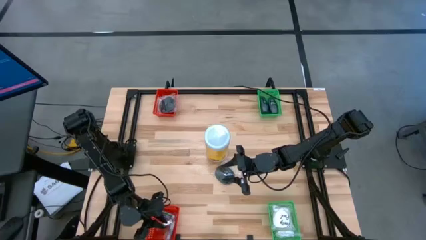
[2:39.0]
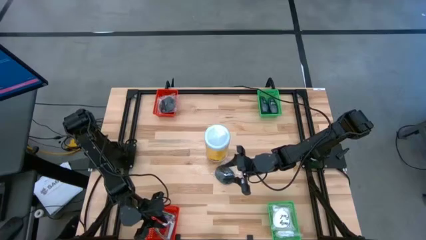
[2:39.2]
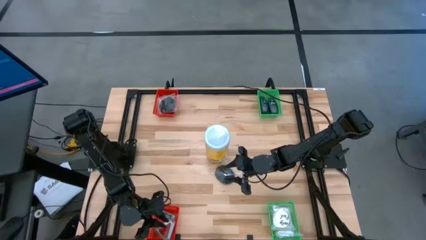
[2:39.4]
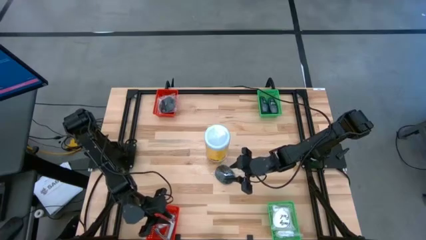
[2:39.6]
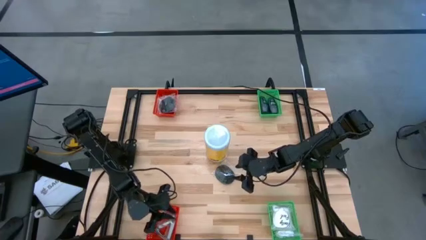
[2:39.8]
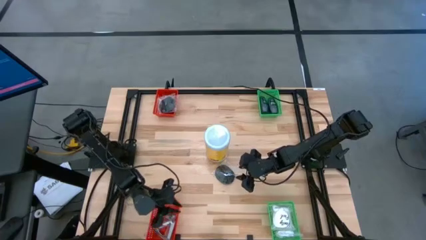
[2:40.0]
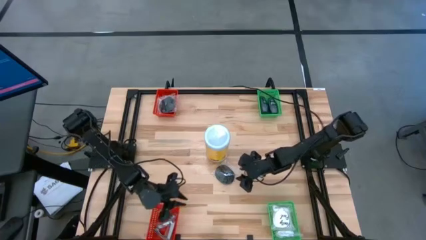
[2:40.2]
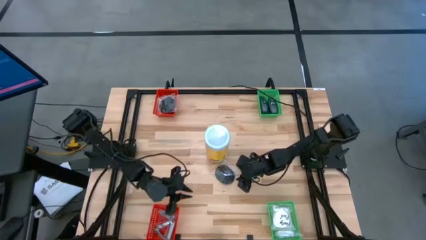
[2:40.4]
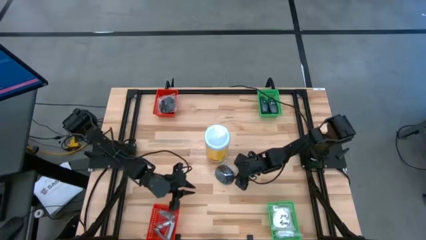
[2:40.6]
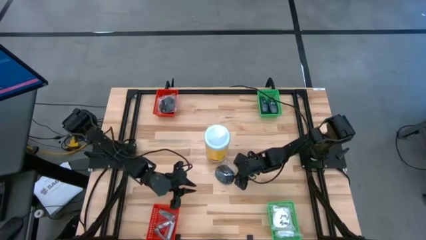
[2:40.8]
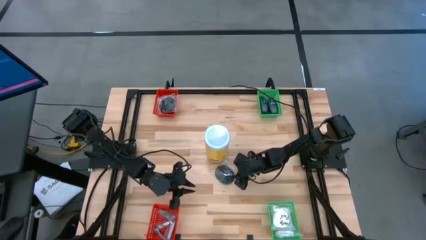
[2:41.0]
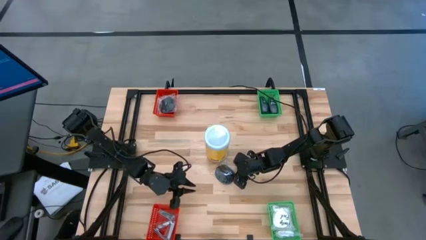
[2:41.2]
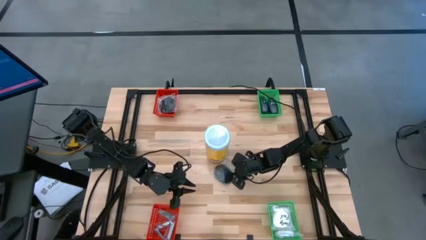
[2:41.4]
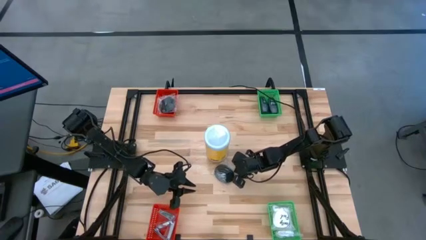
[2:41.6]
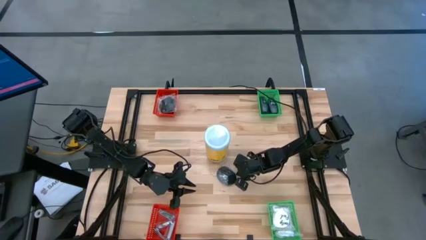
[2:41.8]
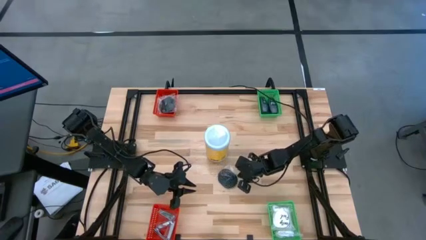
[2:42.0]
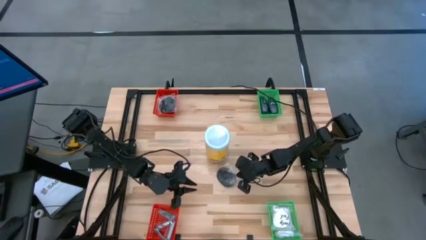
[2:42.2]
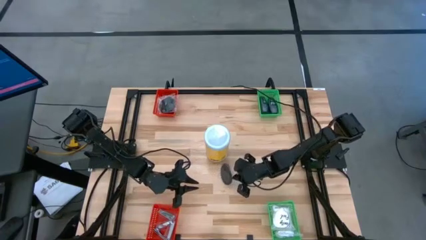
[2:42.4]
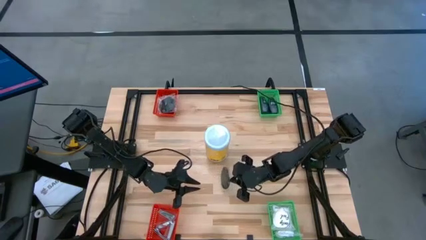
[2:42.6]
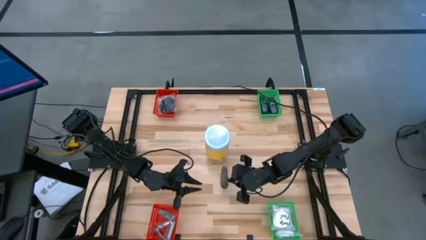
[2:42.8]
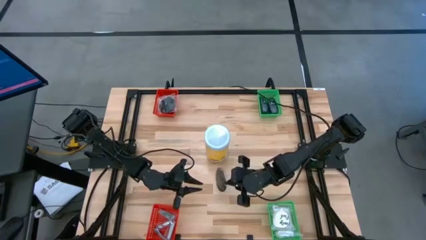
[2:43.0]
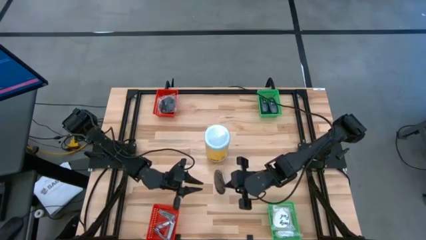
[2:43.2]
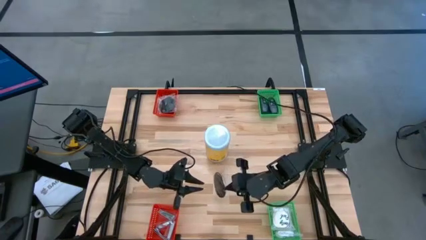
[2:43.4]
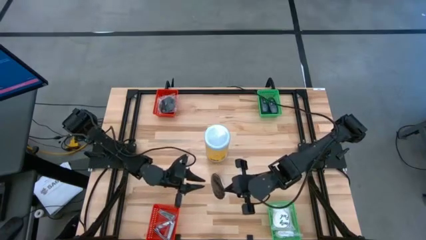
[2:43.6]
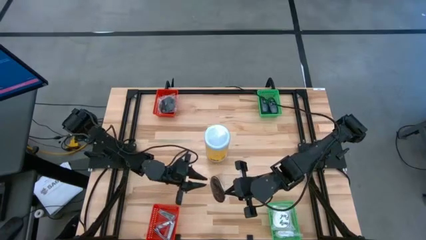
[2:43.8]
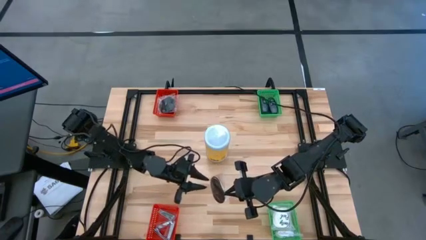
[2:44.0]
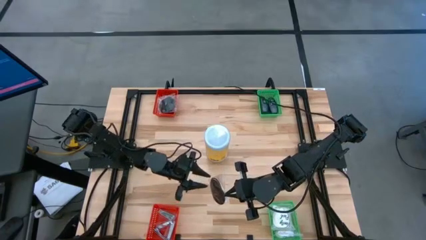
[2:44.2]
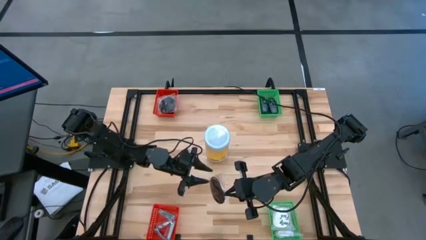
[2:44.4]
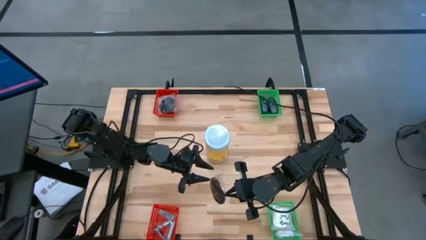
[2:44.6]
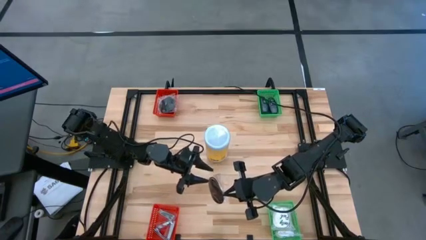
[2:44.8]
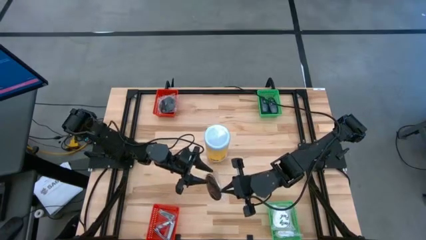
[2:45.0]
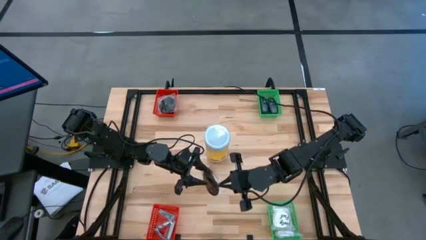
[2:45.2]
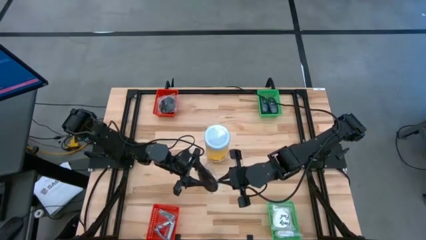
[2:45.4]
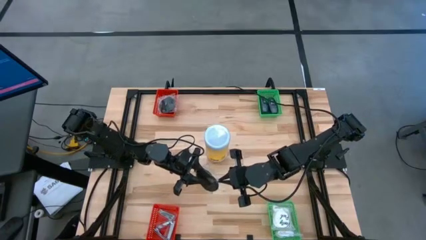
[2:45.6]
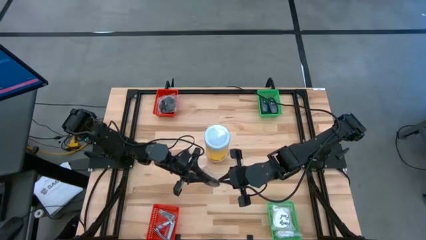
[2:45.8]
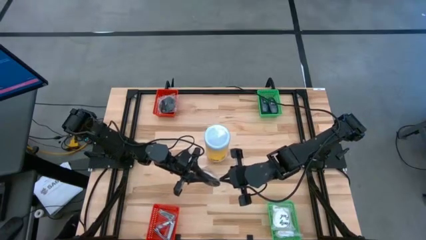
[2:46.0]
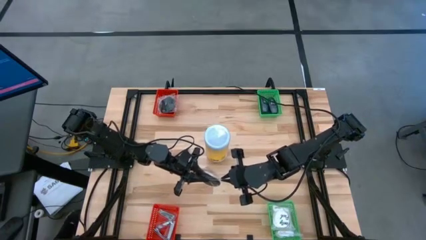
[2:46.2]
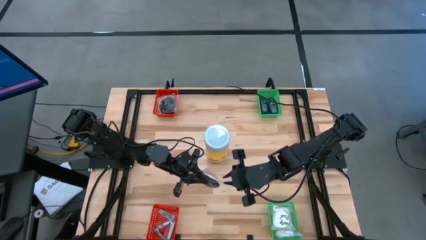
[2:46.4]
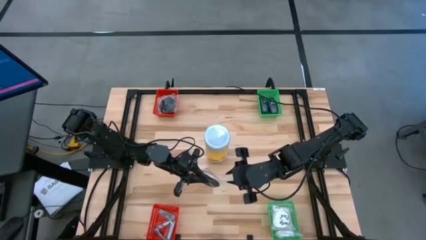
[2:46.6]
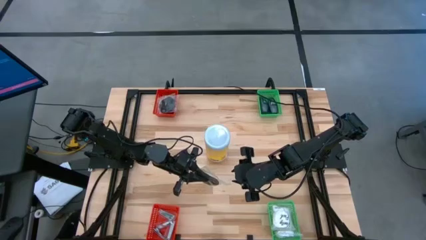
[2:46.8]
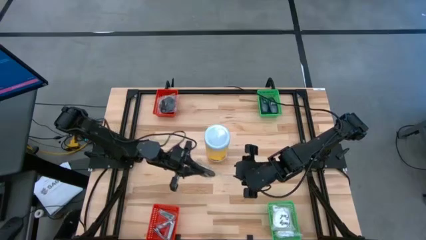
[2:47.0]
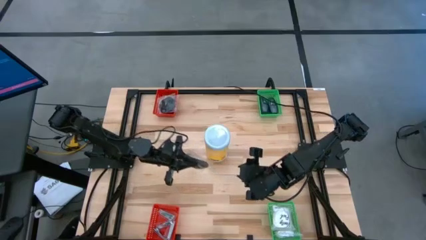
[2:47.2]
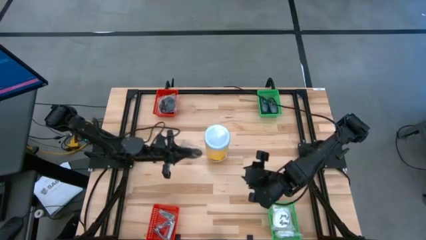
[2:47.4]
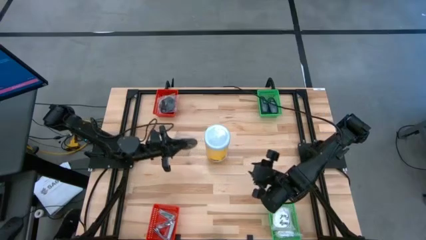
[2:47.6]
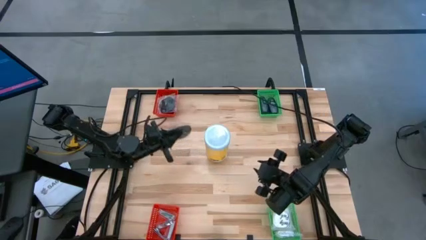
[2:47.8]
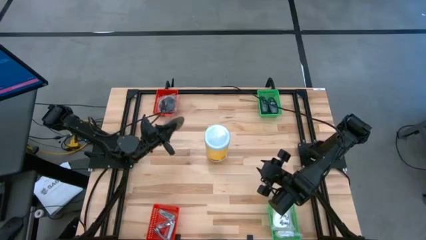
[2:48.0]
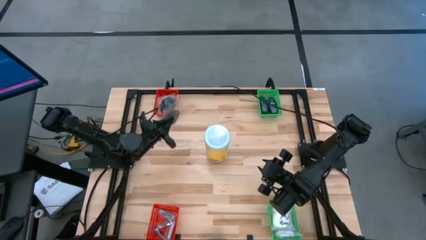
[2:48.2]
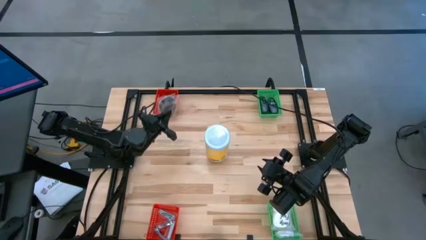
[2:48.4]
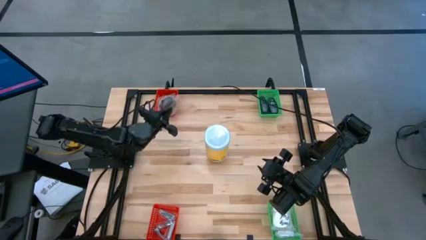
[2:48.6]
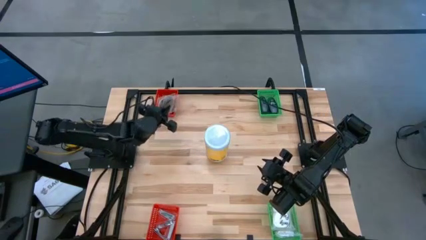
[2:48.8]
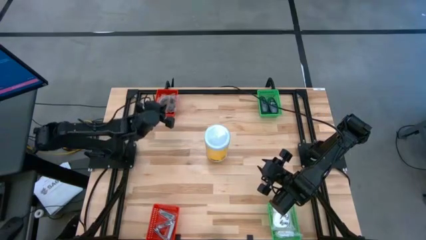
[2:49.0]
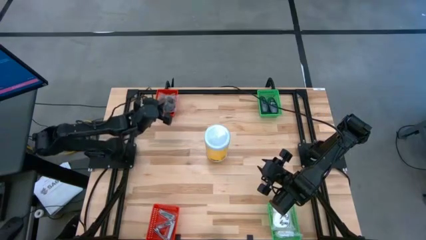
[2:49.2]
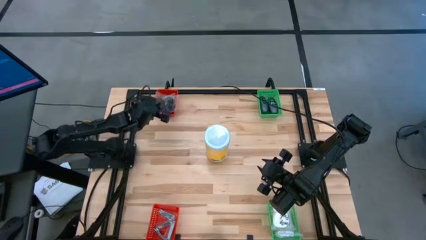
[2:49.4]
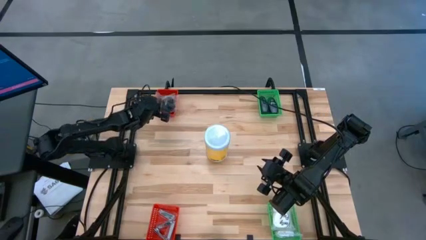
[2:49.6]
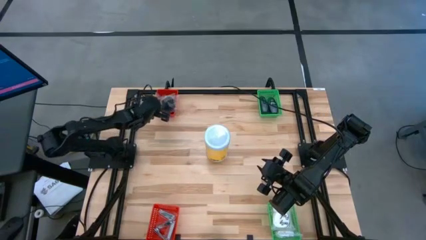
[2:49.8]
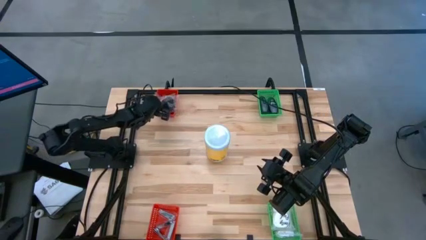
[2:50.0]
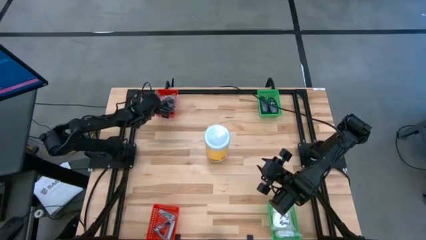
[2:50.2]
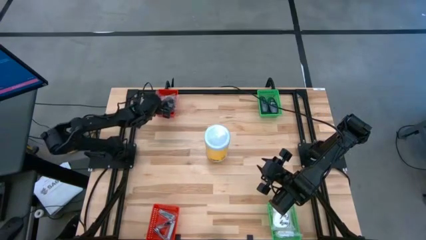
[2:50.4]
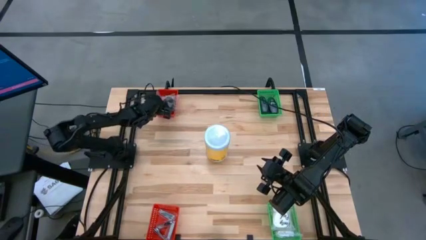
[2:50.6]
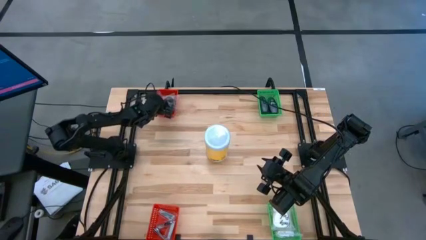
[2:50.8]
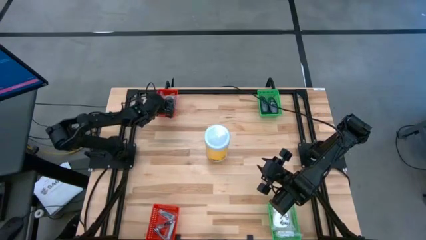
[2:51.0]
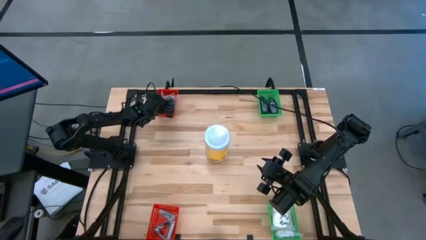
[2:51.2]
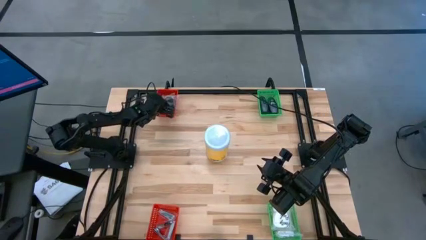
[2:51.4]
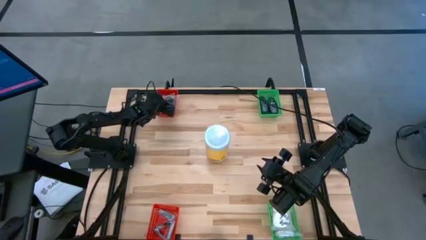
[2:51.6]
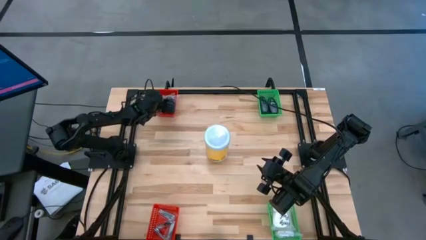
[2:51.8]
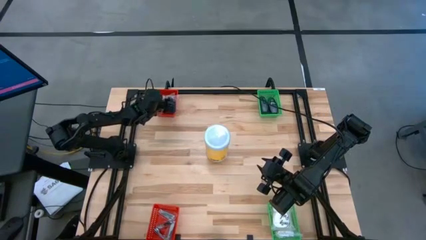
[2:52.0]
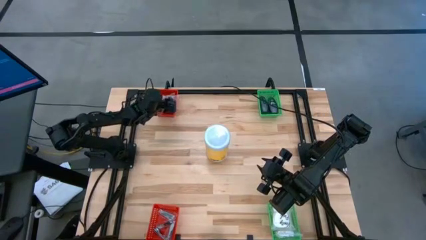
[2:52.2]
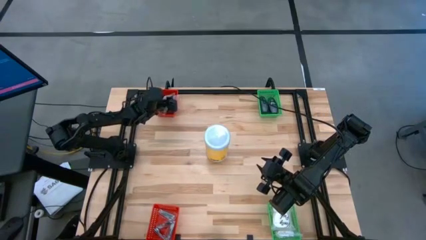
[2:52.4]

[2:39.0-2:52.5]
Task: Pick & Place Travel size toiletries
Put the black hairbrush into the top orange bin

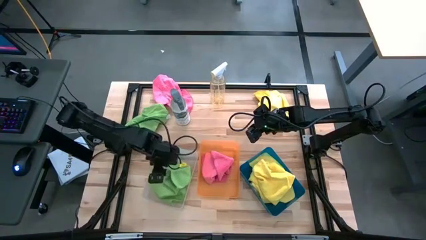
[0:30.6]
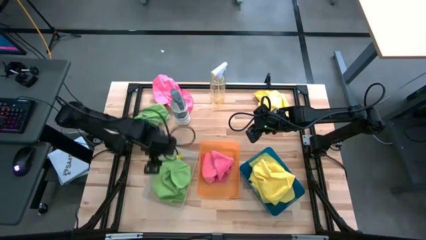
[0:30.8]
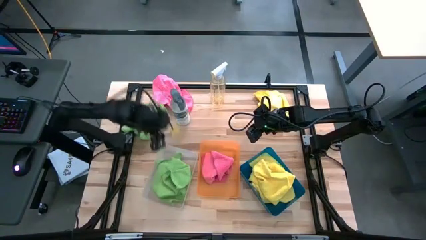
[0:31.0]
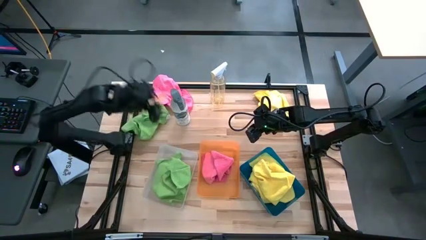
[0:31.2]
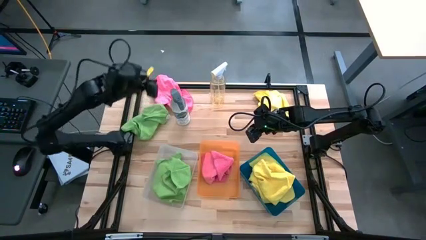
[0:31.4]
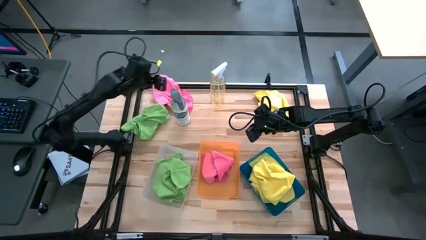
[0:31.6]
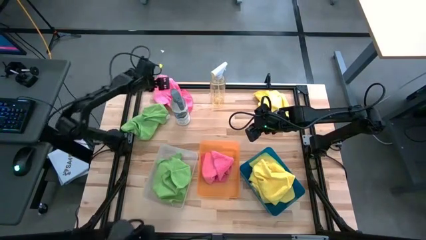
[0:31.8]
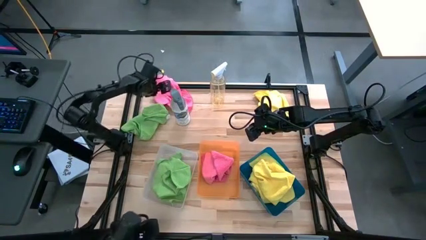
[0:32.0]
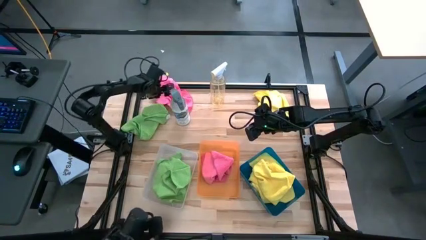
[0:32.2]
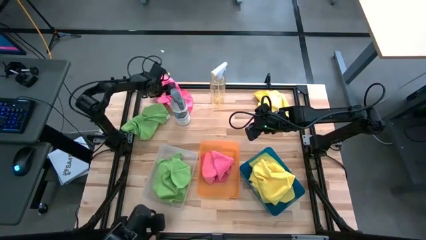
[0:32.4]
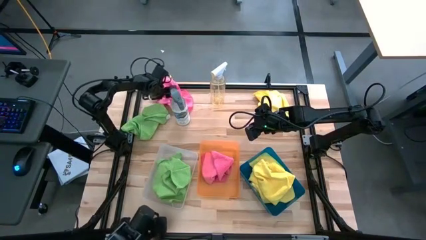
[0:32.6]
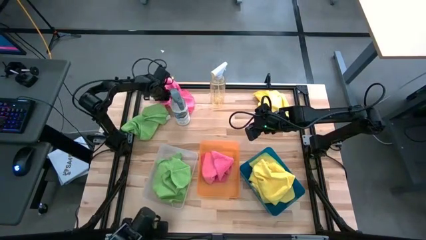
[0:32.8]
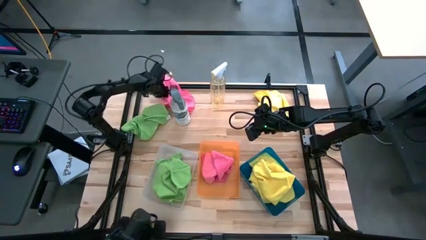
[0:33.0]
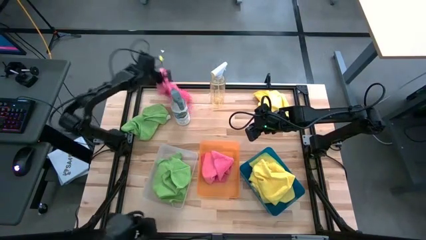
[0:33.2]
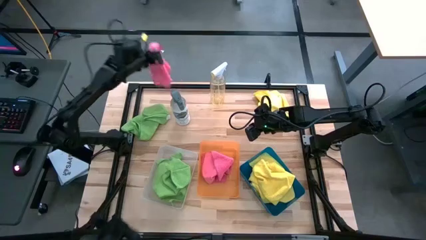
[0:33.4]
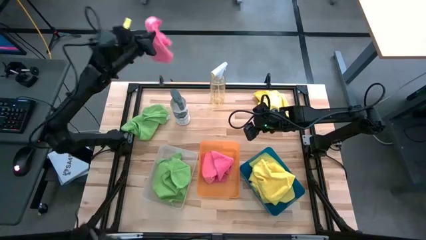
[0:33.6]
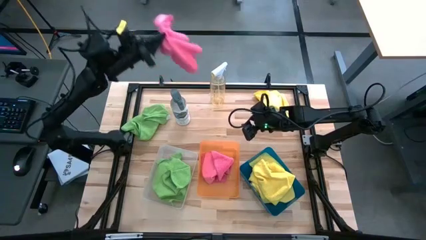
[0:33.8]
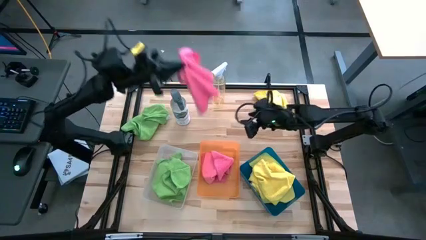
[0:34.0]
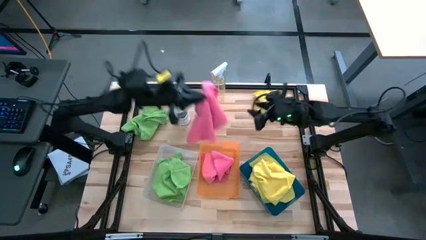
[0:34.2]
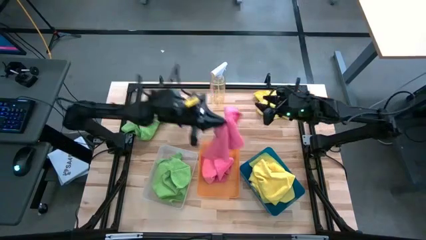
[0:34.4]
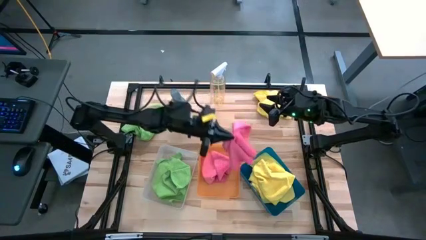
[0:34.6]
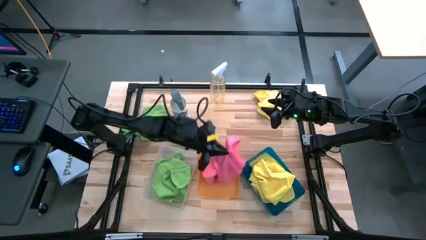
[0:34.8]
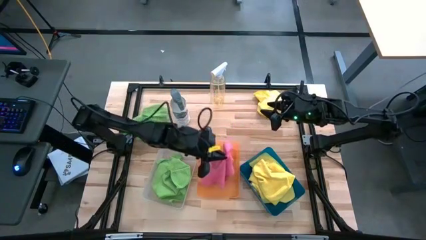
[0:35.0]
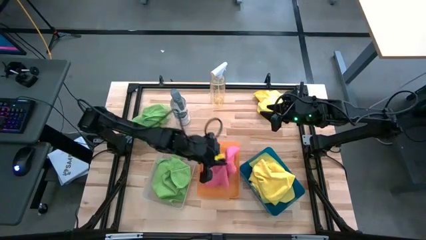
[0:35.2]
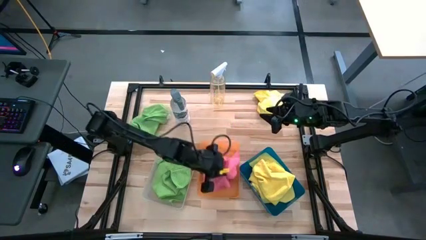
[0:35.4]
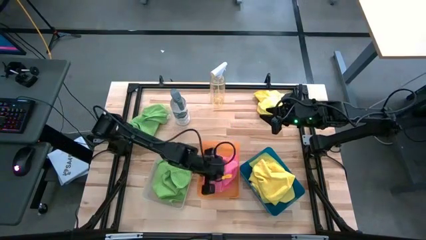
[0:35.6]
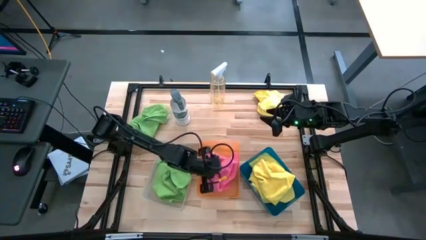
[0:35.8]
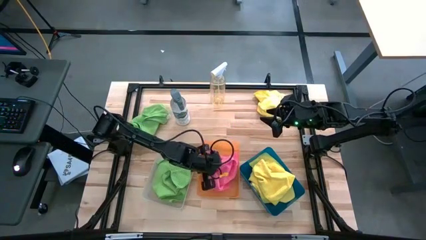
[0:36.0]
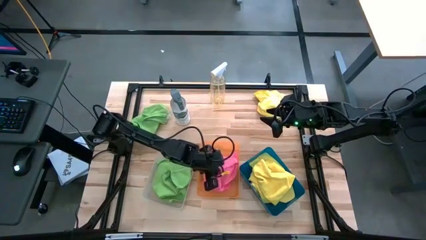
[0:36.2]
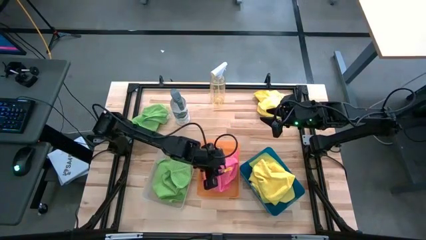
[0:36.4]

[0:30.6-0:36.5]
Task: Sort microfiber towel by color & place in baskets
Put the pink towel into the orange bin
